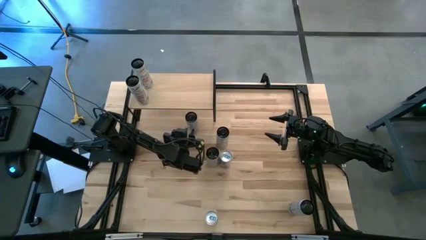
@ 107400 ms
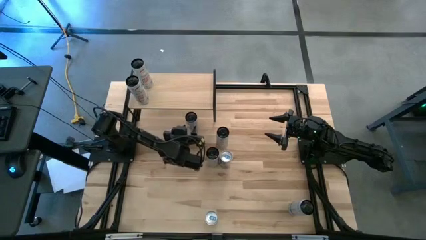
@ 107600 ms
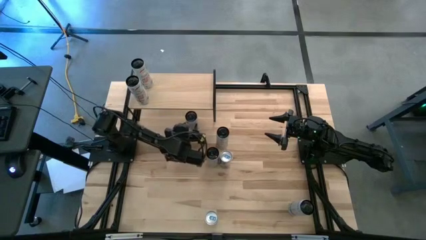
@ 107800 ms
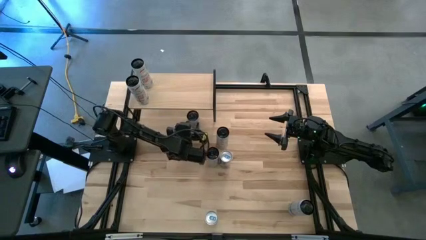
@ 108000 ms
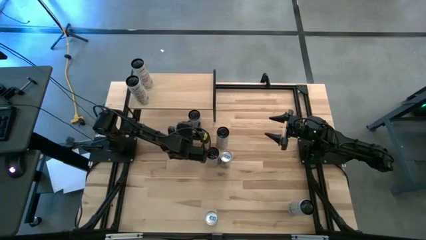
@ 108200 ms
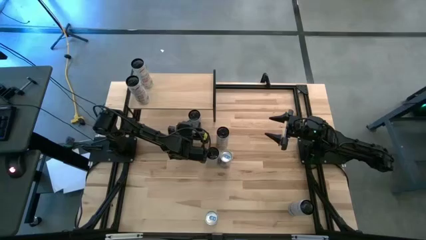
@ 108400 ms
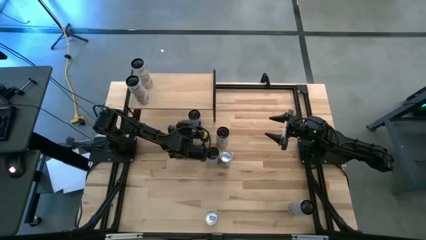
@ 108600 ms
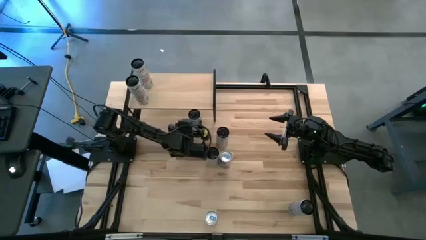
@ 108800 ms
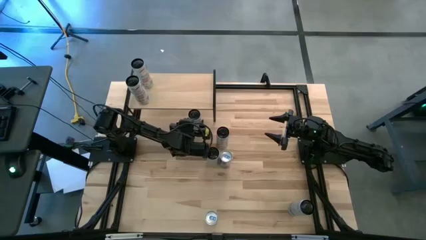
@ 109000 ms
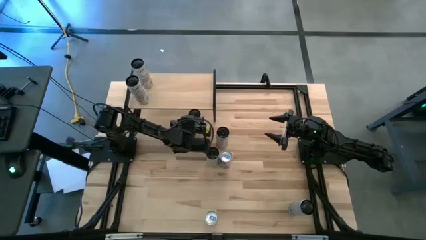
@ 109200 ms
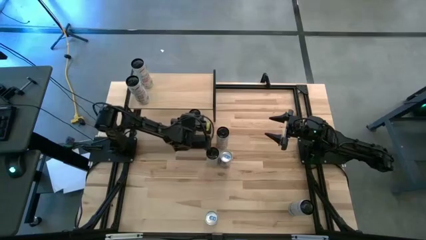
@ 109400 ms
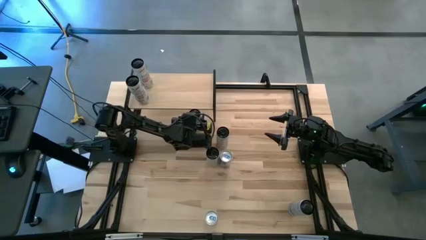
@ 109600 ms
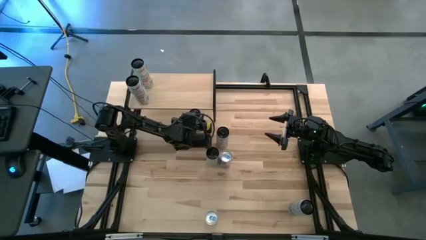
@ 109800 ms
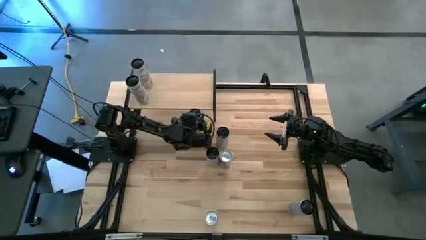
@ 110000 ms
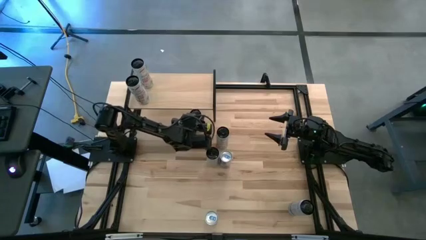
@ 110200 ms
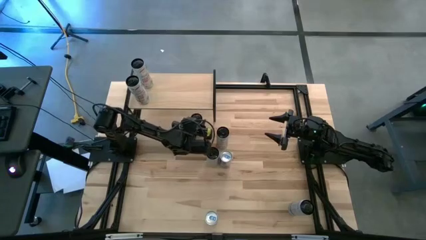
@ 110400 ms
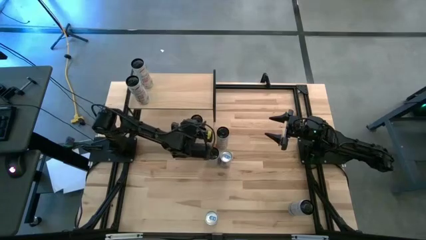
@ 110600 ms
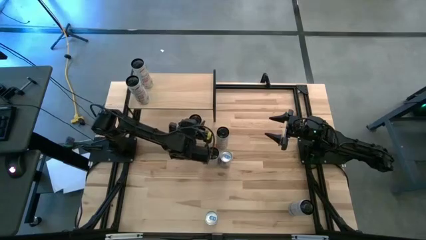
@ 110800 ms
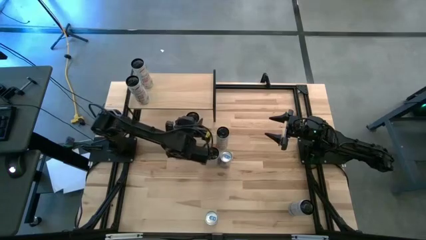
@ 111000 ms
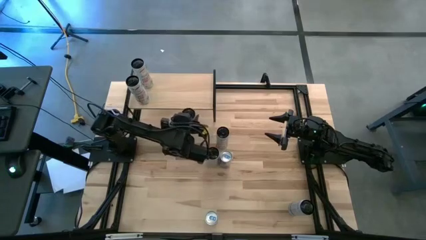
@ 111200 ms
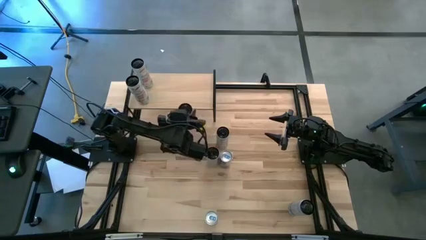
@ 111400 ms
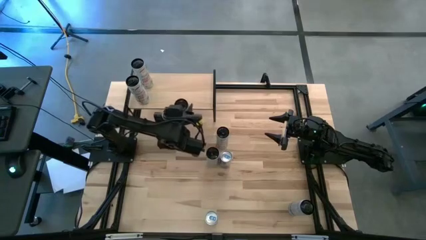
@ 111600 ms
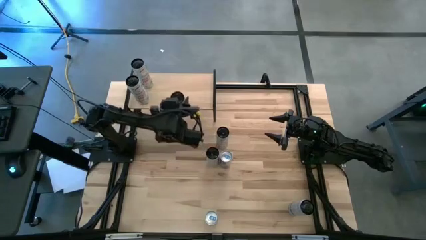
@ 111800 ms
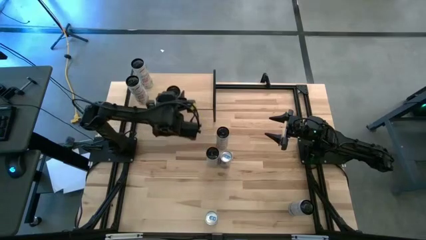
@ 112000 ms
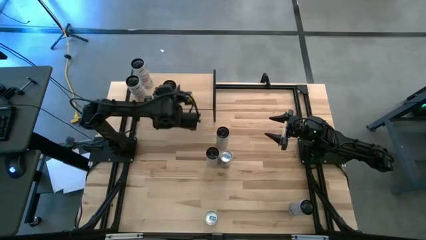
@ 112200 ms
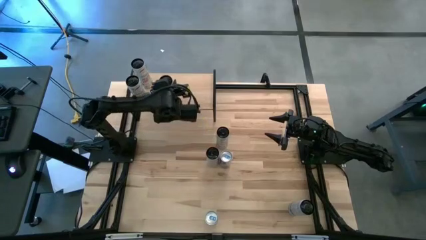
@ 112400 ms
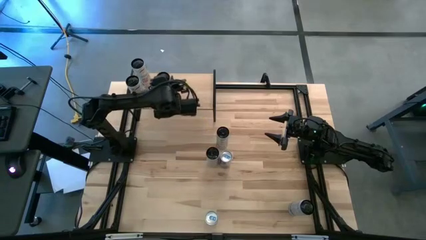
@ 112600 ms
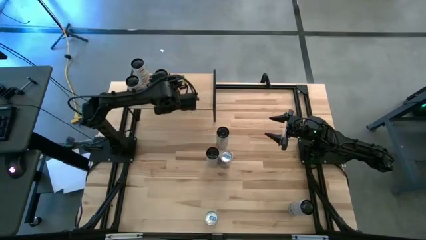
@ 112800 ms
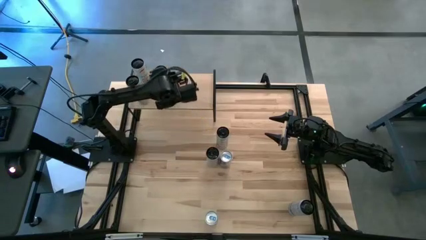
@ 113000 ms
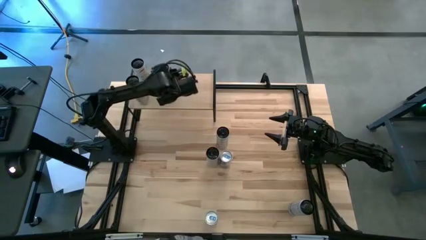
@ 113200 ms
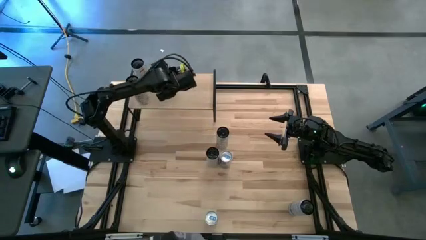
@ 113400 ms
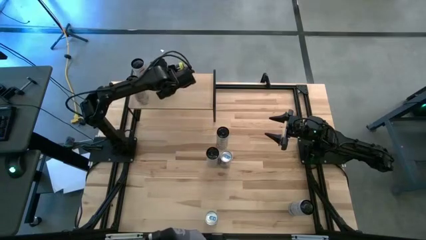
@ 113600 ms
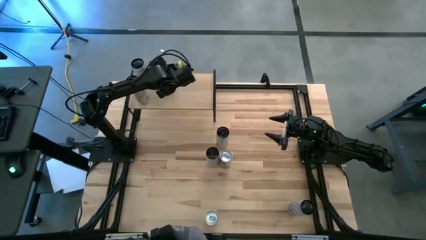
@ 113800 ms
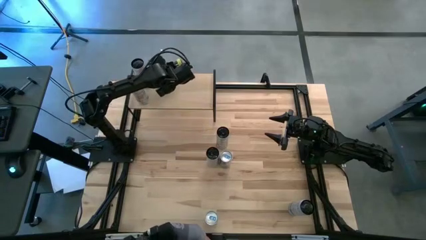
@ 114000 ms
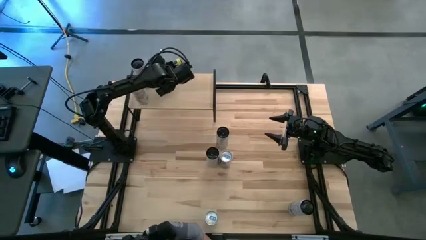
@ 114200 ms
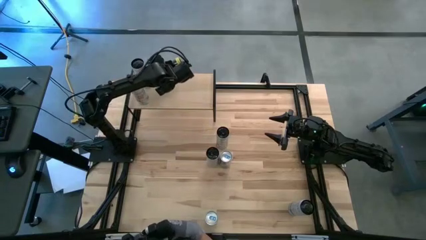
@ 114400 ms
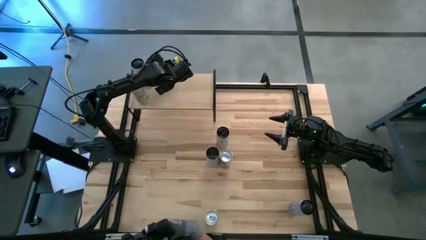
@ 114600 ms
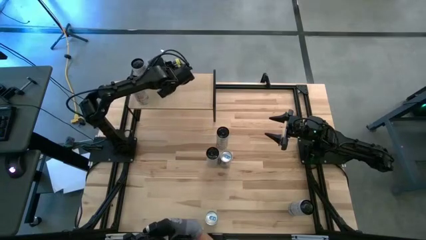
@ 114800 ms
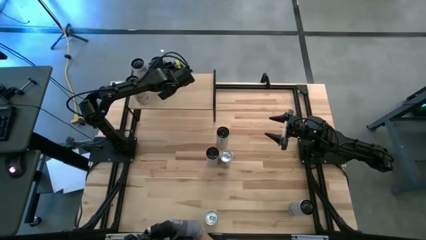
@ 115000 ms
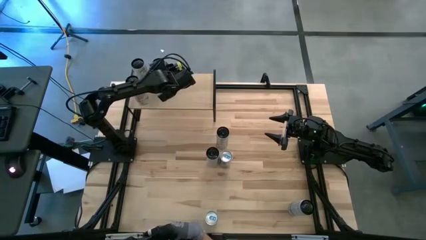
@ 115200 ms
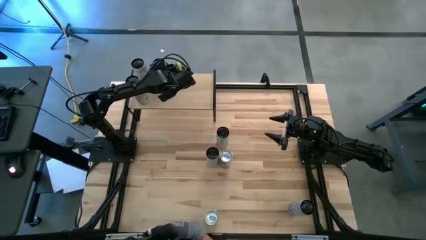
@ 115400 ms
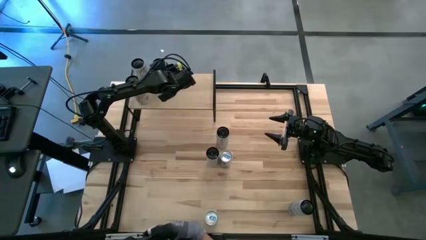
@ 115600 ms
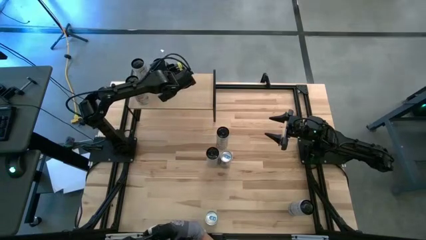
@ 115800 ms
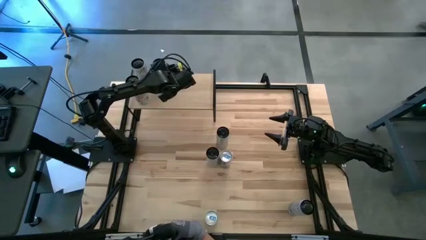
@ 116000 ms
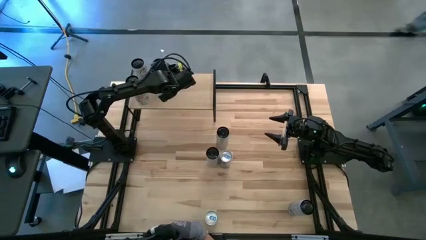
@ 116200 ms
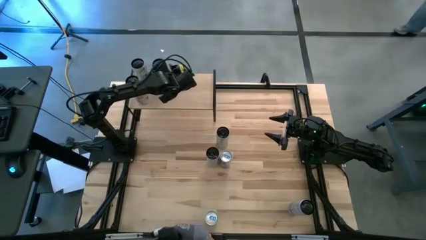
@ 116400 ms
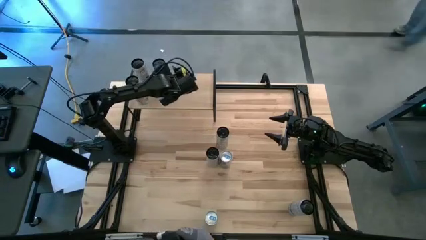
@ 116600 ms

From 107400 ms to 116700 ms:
Task: Place canned beverage on shelf
Put the top white blue soda can on the shelf

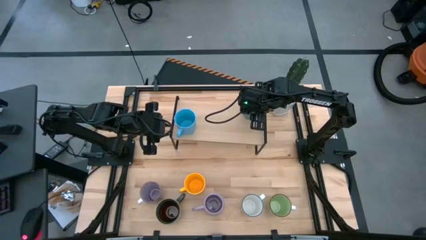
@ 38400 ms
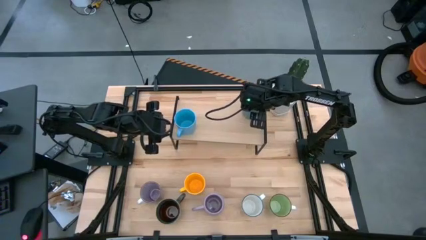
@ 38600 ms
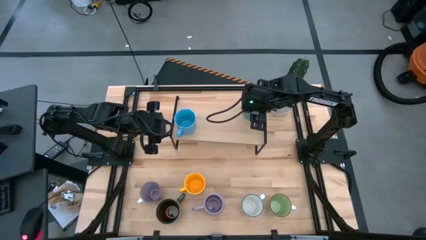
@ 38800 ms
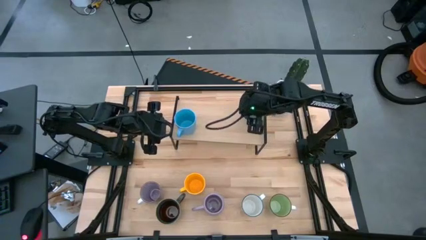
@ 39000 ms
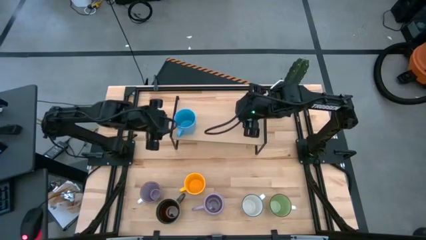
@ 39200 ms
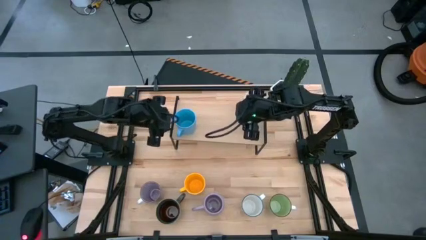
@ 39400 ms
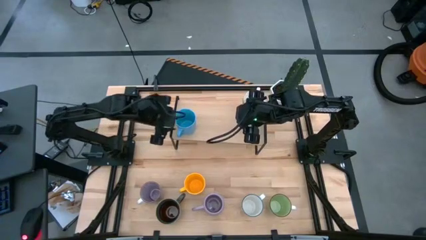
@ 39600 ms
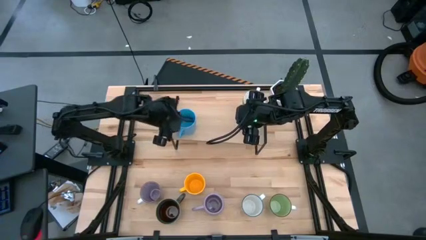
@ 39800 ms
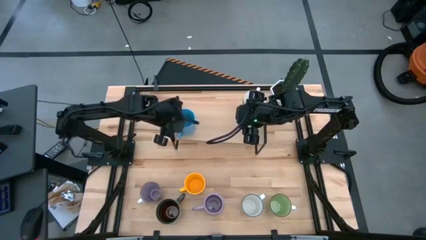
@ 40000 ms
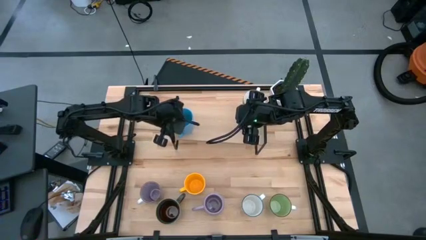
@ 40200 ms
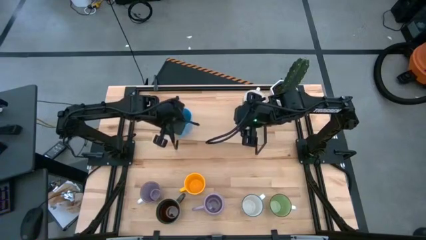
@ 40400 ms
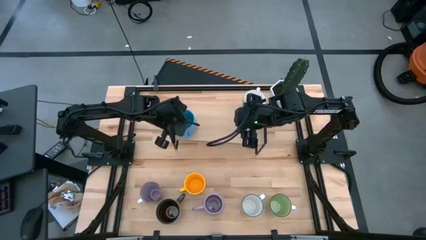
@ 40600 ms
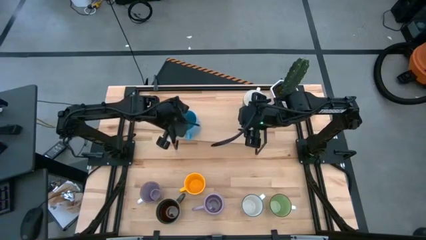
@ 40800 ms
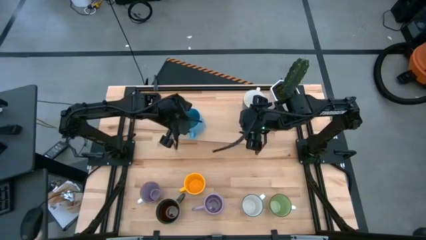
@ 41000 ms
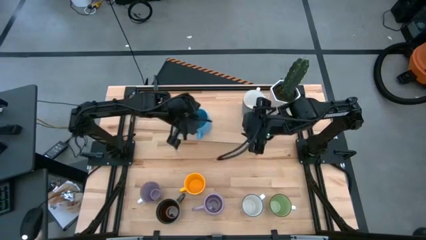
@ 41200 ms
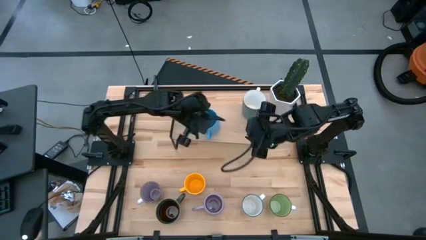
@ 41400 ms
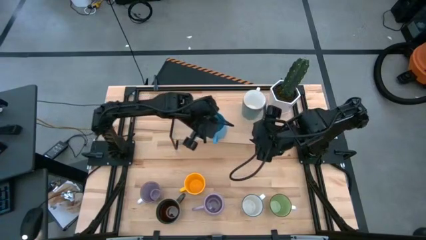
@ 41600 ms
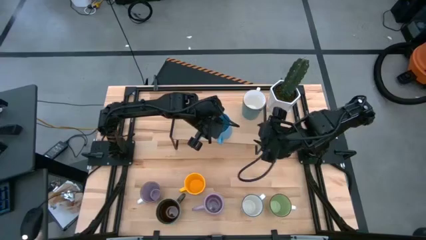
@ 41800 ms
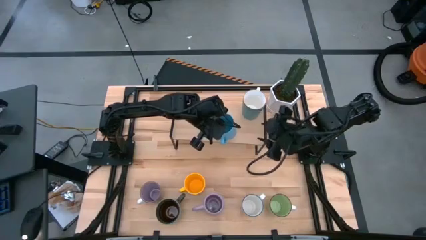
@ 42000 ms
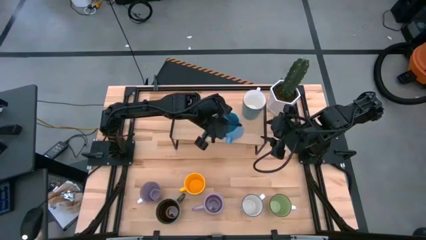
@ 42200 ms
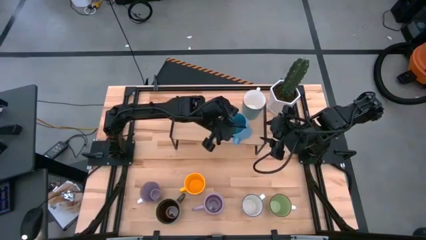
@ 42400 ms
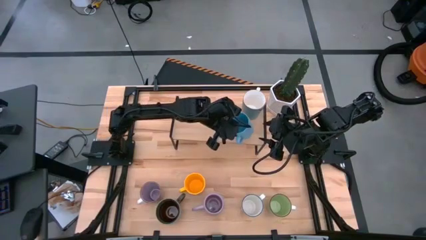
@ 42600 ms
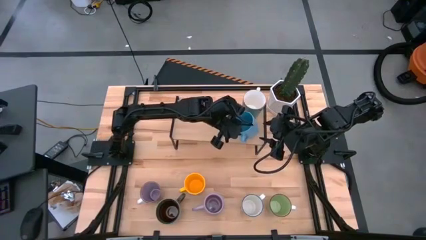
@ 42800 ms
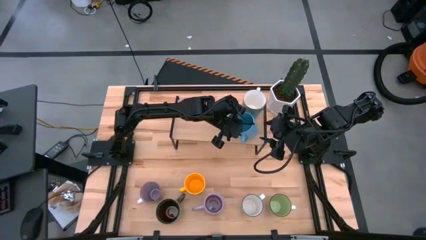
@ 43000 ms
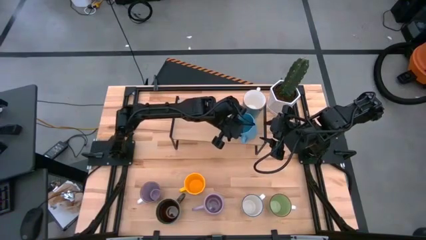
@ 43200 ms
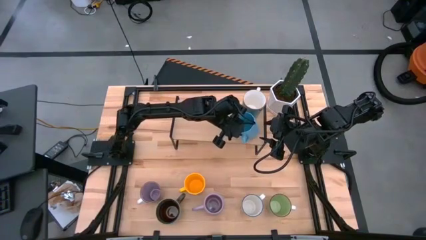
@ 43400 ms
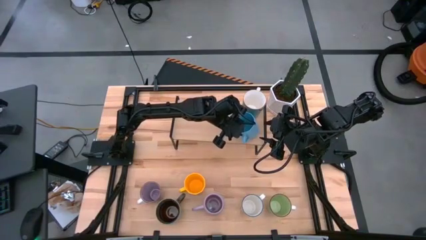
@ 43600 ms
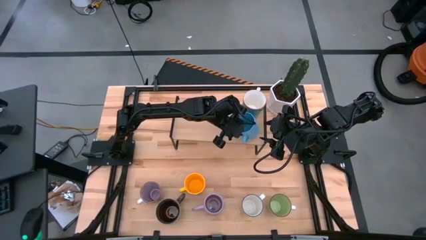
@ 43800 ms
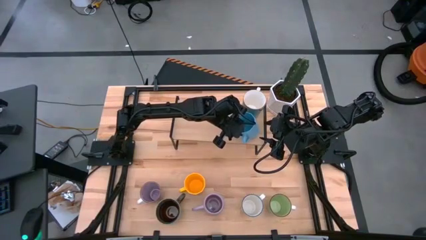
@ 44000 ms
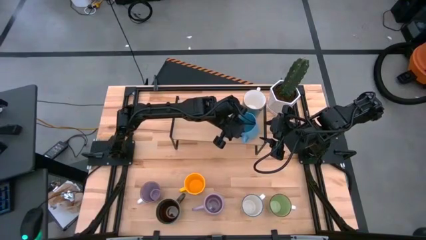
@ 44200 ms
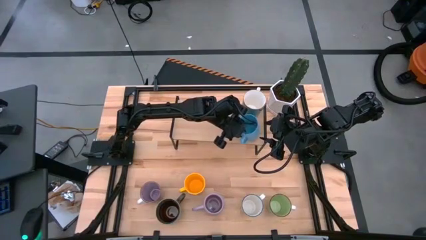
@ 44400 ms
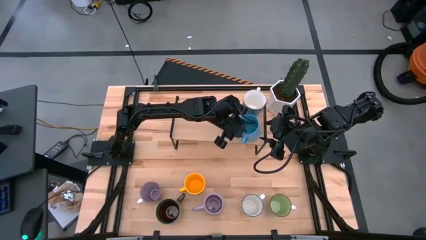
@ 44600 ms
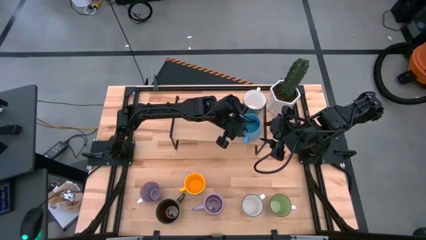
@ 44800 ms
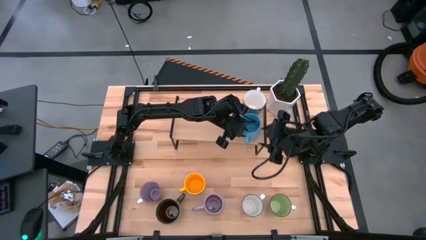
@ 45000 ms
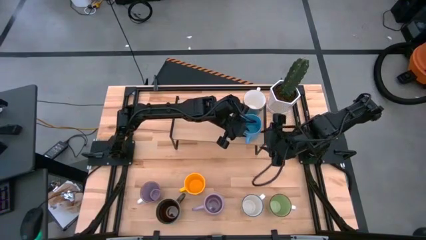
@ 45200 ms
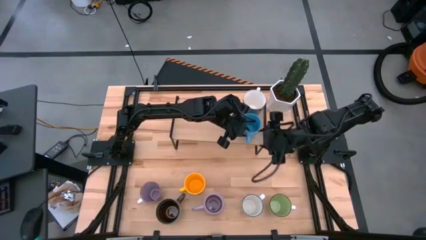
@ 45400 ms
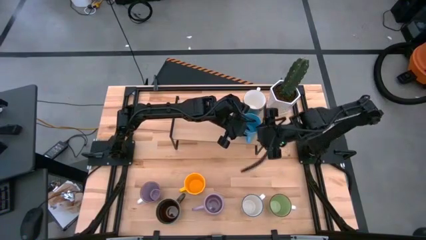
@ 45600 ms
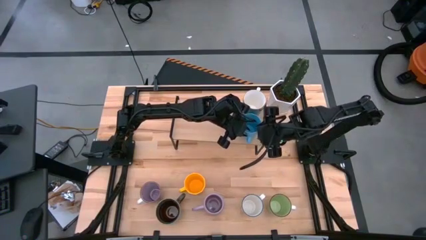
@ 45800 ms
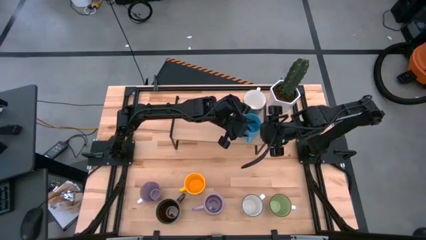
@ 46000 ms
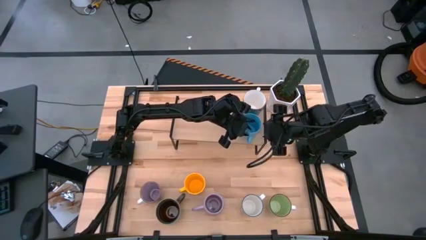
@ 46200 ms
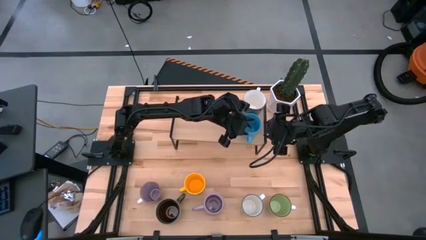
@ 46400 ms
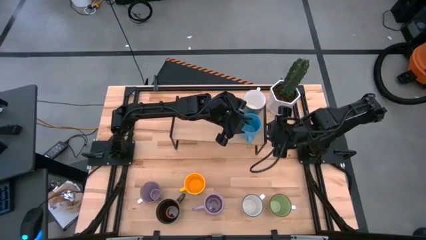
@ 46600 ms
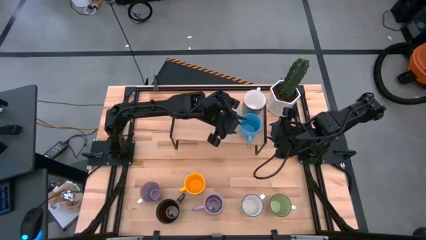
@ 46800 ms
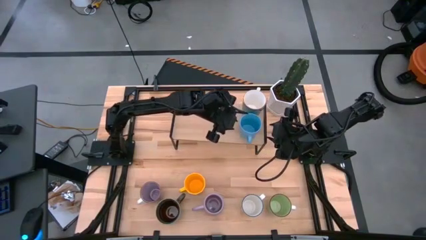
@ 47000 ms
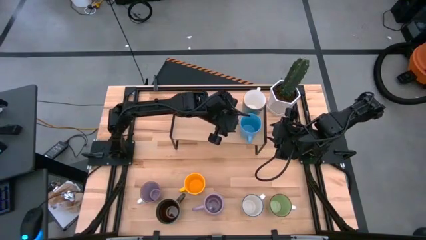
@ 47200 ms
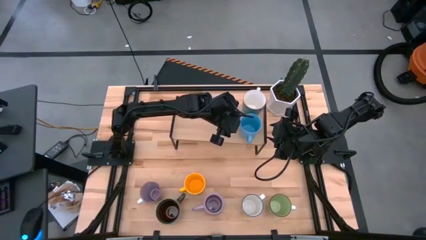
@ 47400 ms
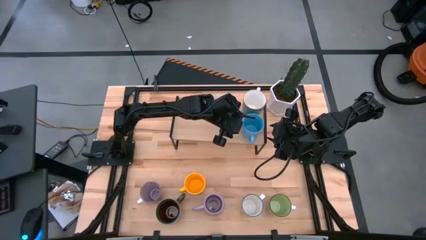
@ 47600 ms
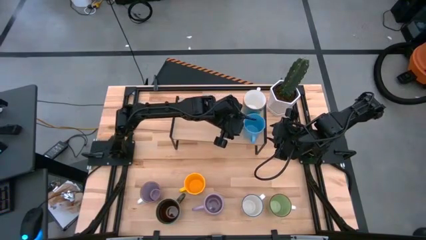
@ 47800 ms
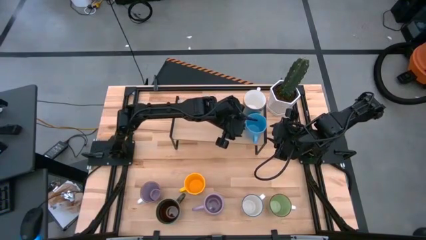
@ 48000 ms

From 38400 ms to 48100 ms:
Task: Place coffee mugs
Adjust the light blue mug on the shelf
